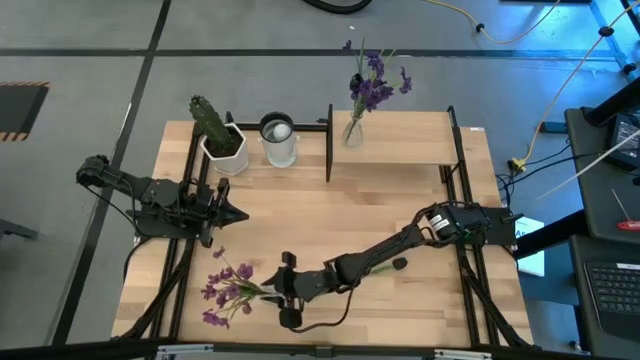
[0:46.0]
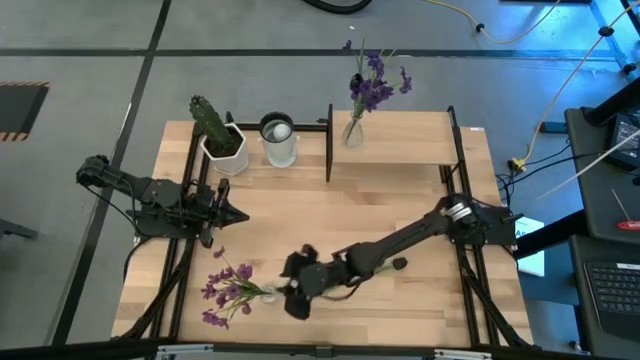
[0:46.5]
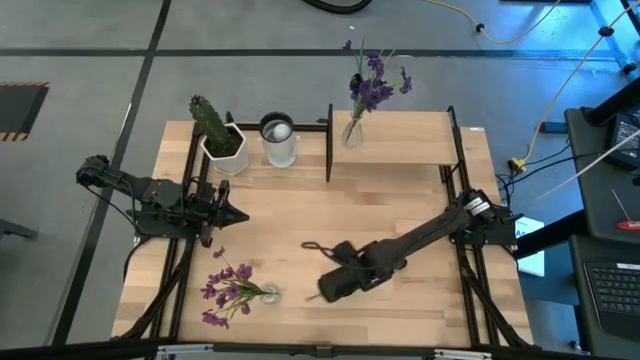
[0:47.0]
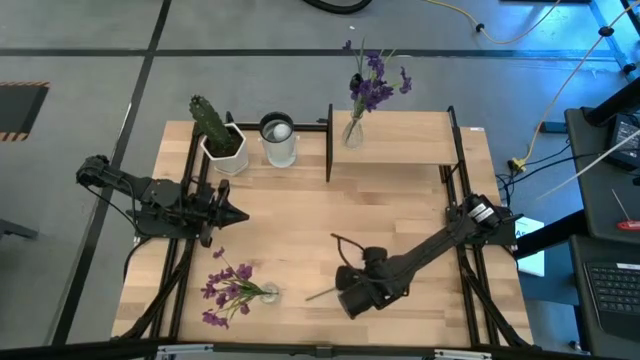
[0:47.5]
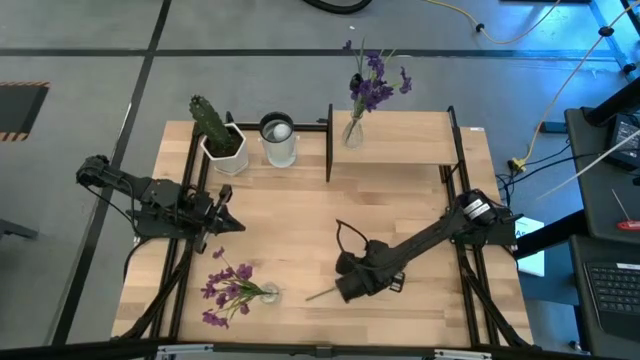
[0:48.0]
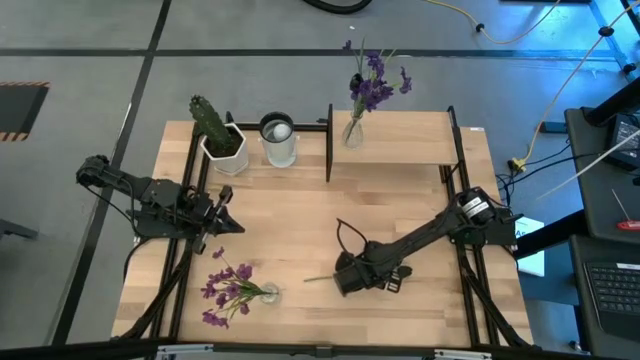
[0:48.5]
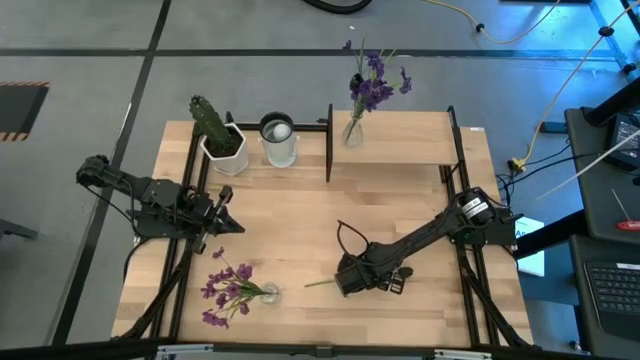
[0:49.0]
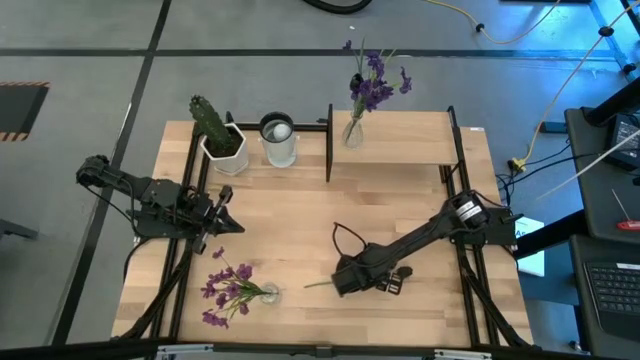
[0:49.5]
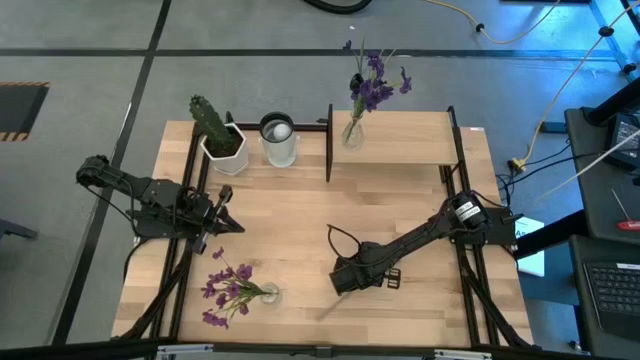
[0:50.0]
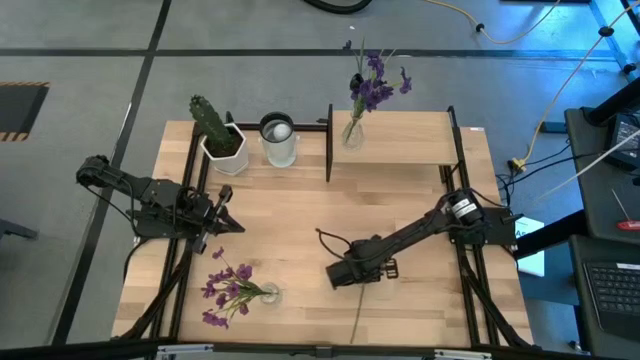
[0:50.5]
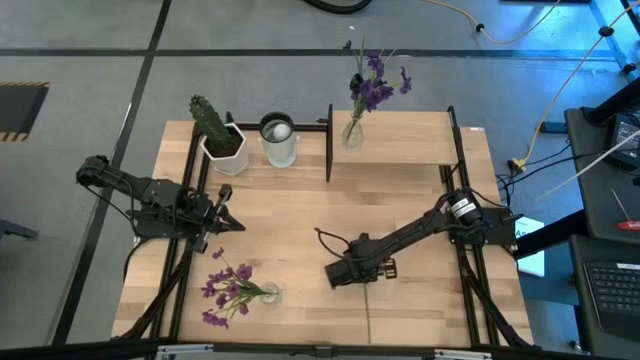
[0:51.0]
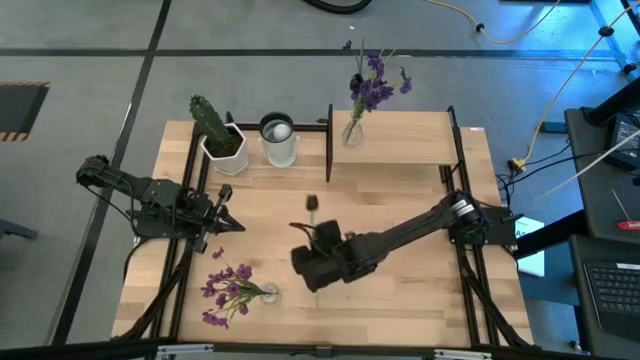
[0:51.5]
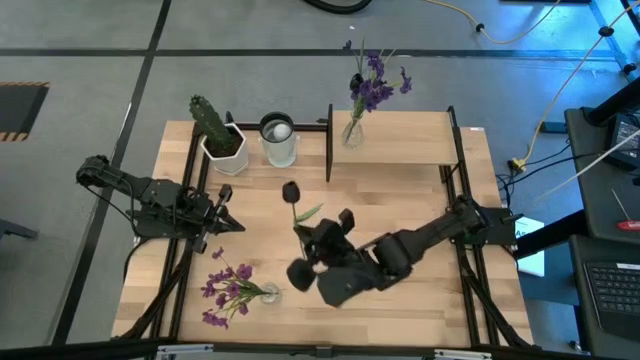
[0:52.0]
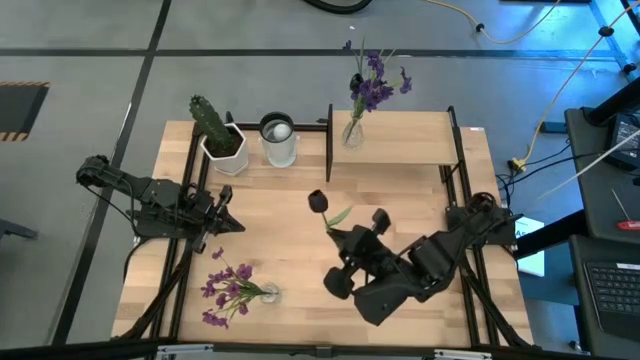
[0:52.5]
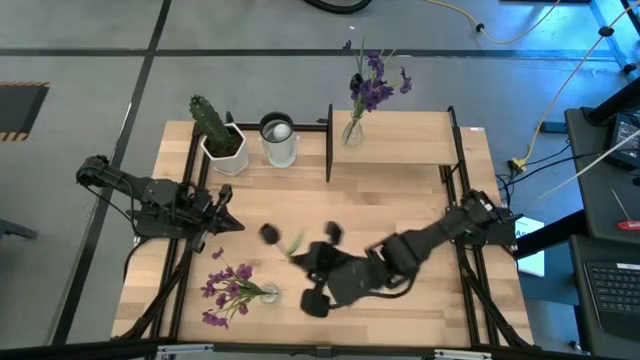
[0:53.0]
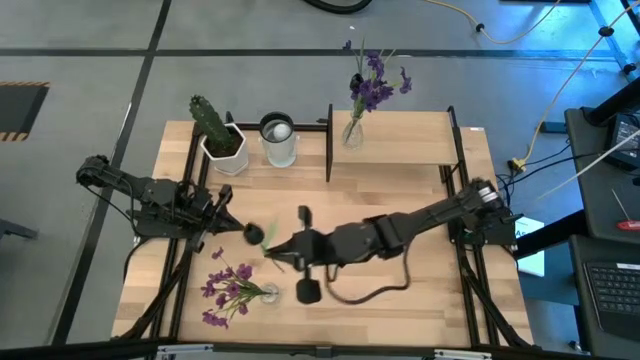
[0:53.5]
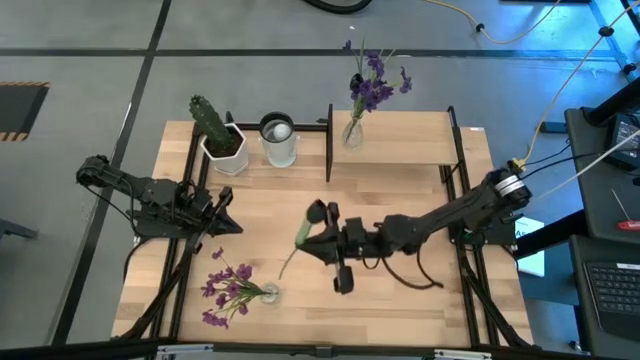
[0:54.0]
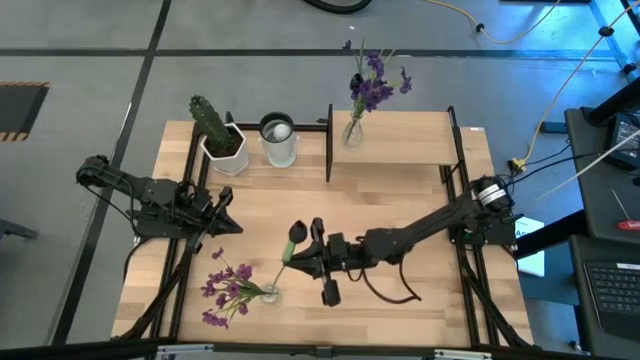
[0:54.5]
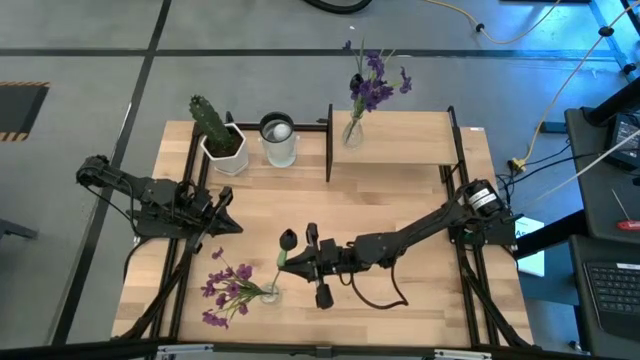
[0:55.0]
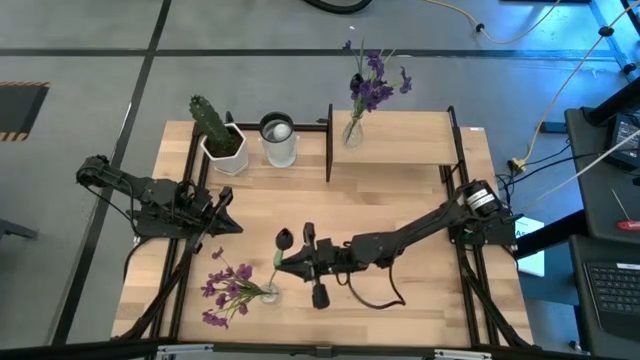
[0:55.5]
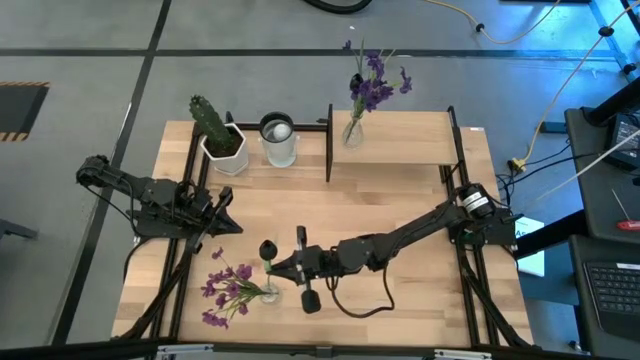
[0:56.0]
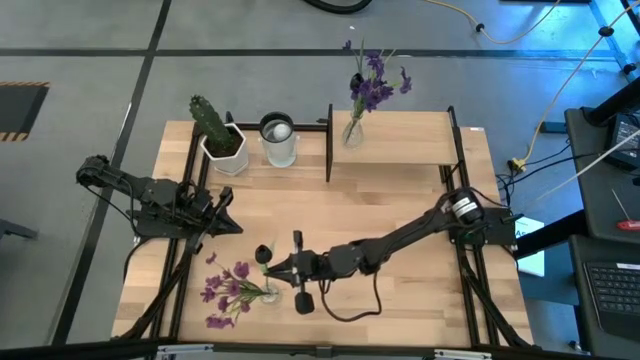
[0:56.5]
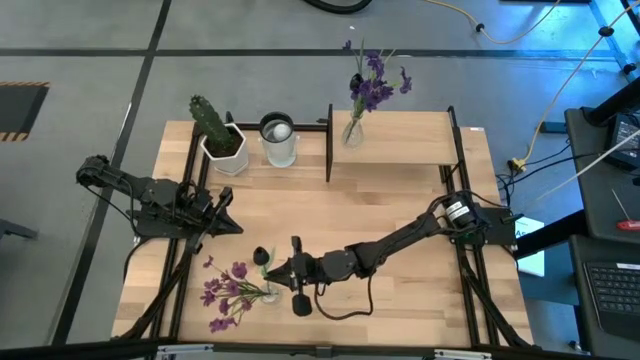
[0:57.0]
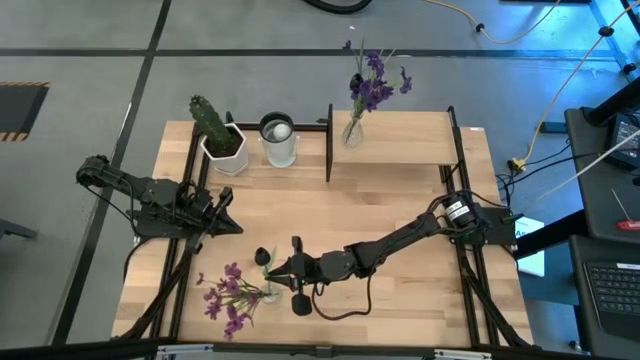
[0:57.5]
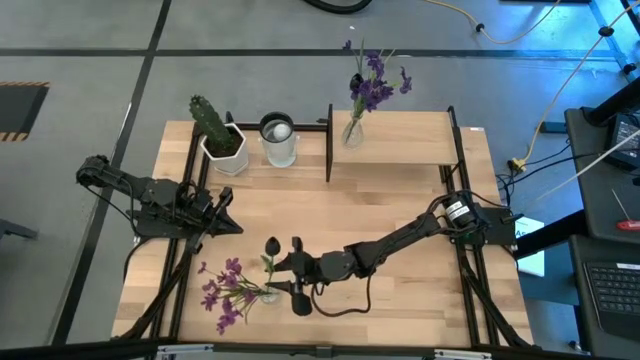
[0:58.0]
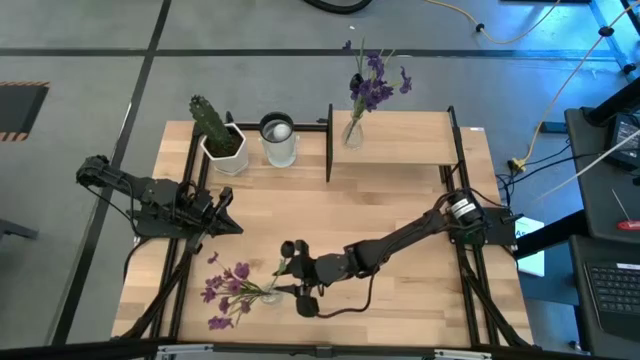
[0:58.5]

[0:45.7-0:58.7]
Task: Pick and place flowers into a vace then onto a shelf
Put the black flower into the transparent vase

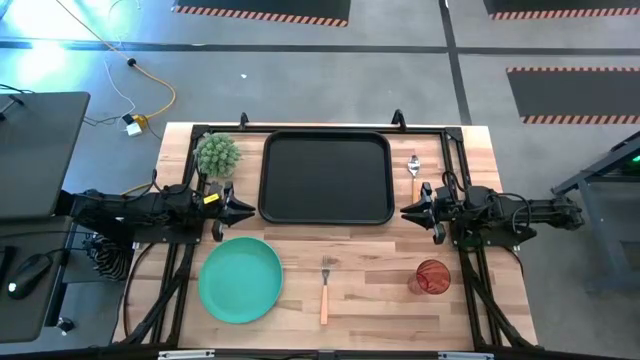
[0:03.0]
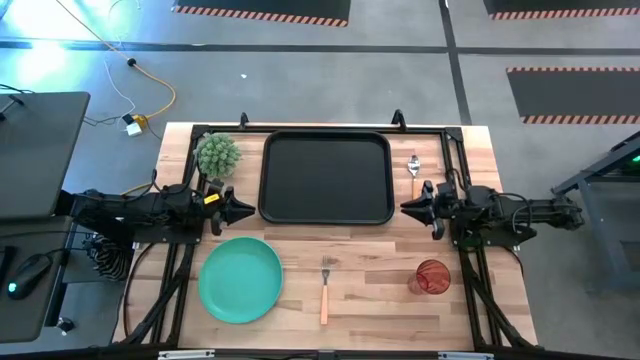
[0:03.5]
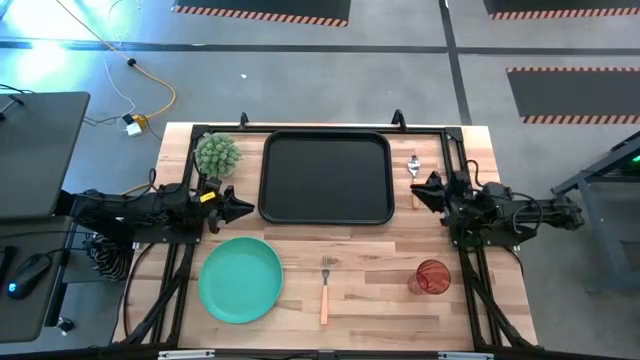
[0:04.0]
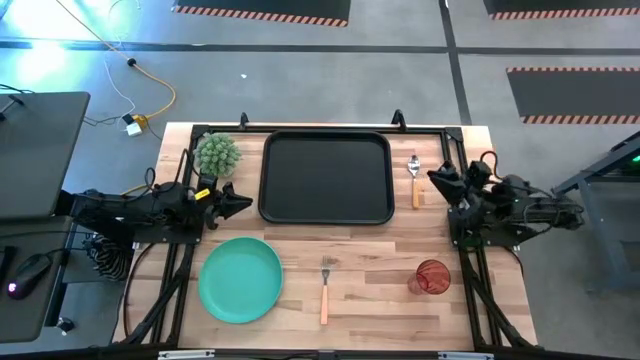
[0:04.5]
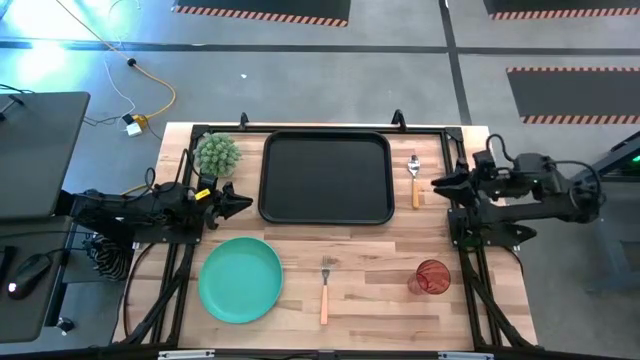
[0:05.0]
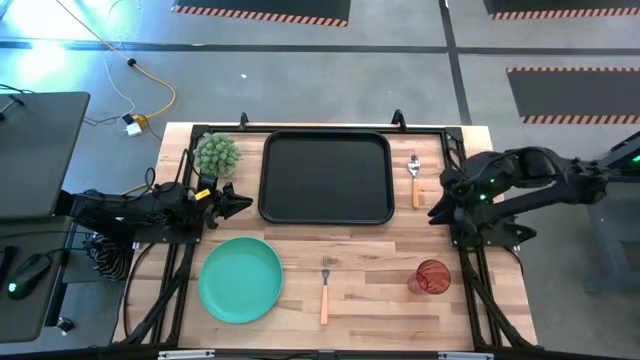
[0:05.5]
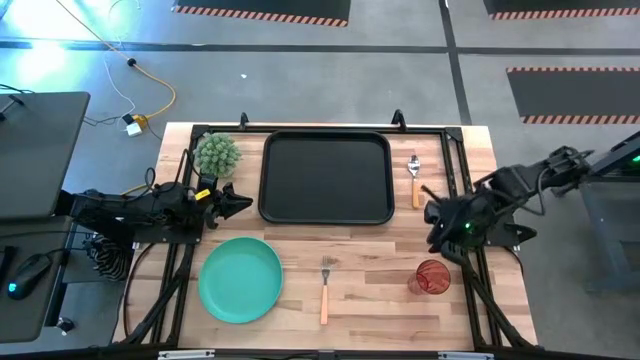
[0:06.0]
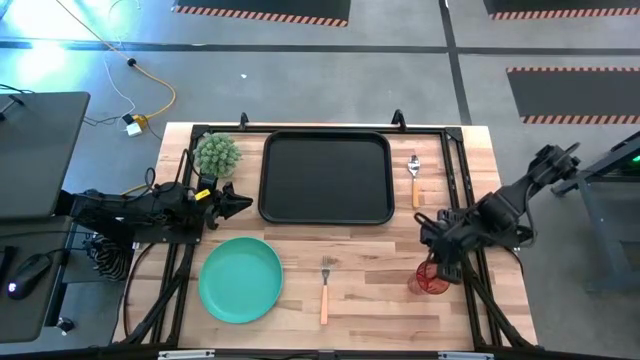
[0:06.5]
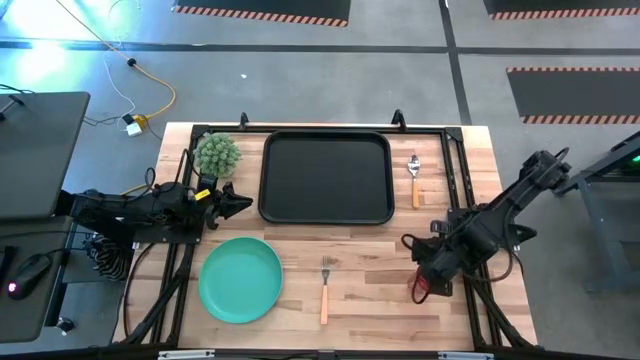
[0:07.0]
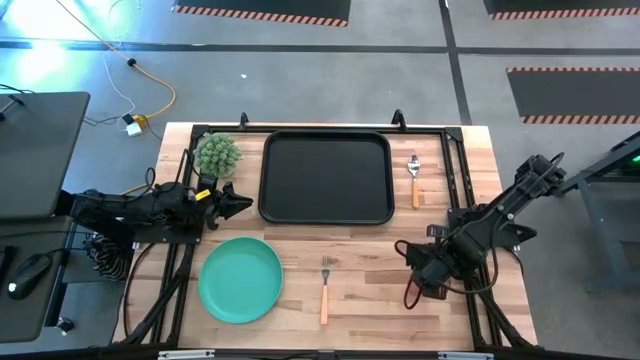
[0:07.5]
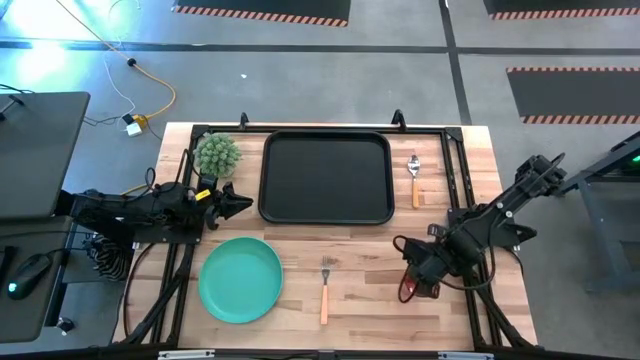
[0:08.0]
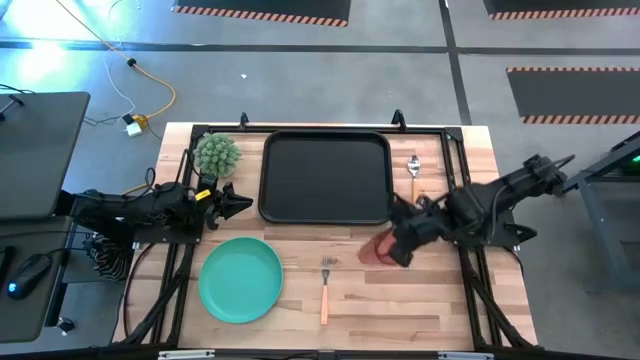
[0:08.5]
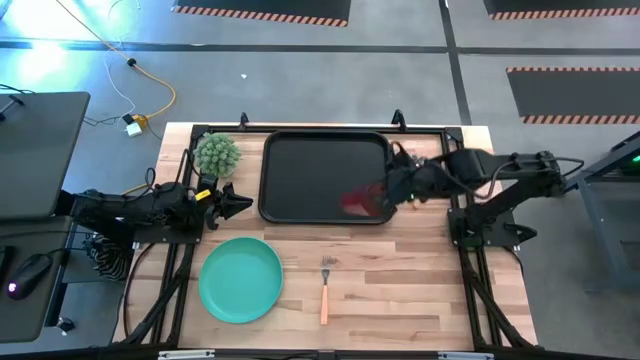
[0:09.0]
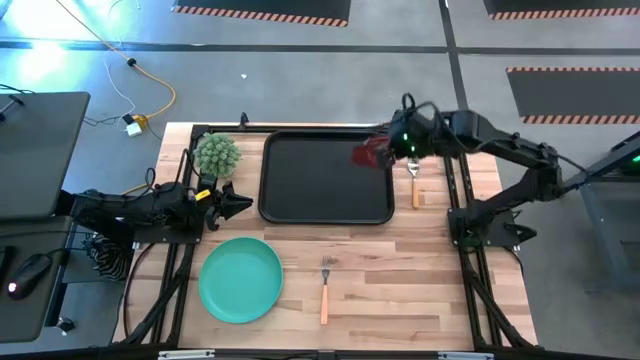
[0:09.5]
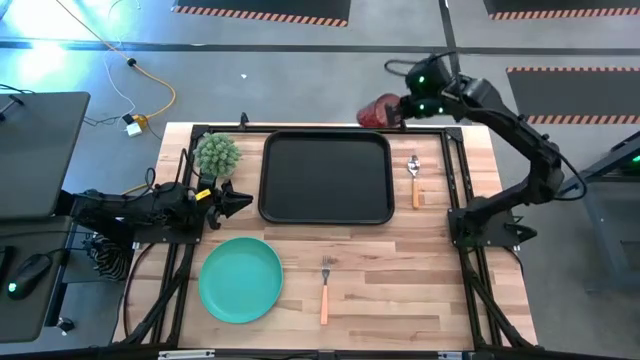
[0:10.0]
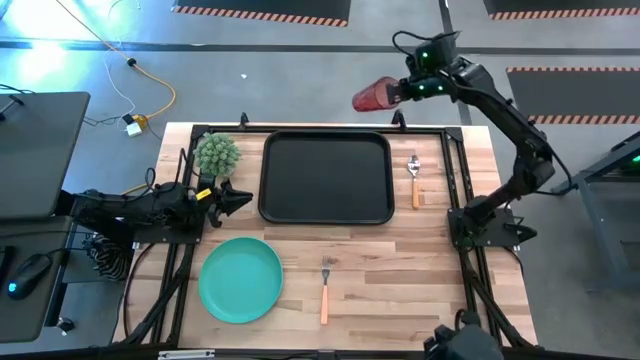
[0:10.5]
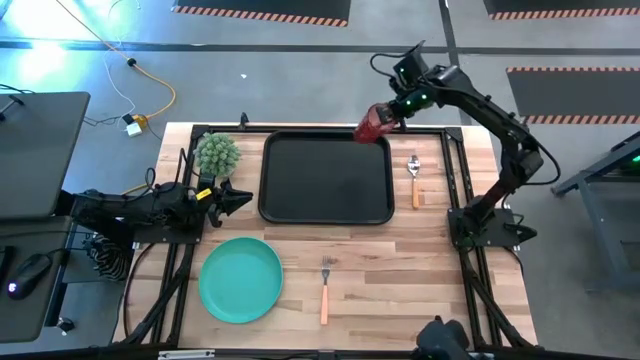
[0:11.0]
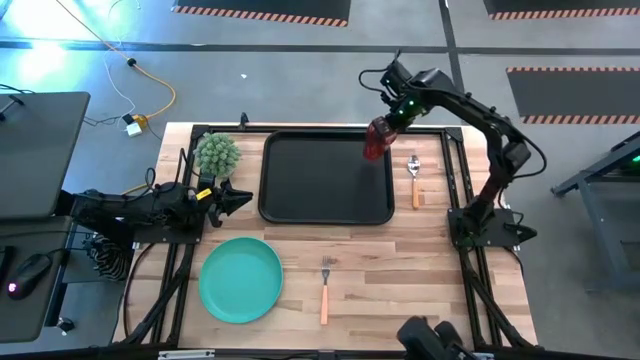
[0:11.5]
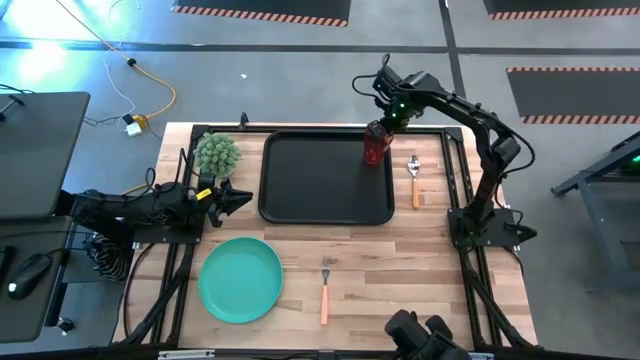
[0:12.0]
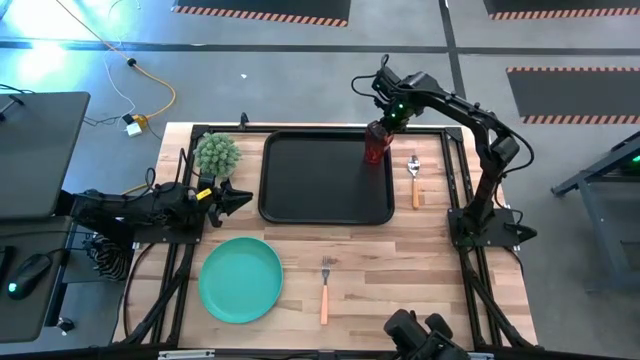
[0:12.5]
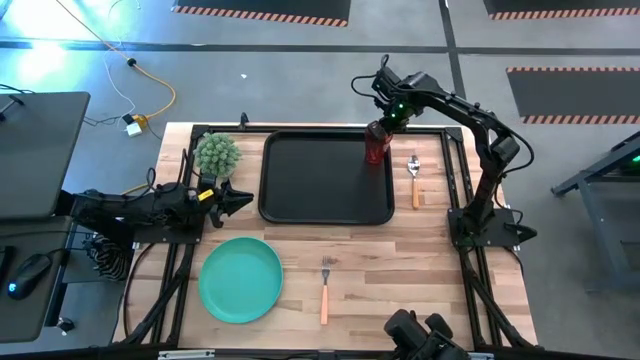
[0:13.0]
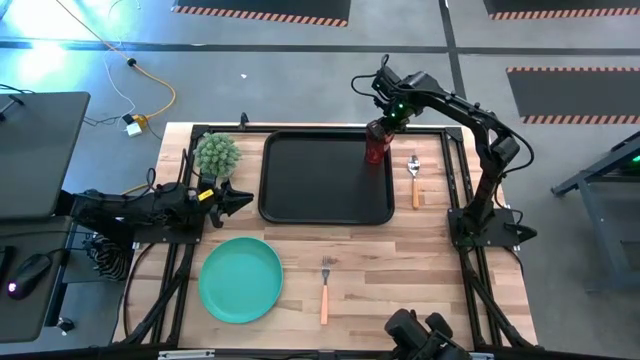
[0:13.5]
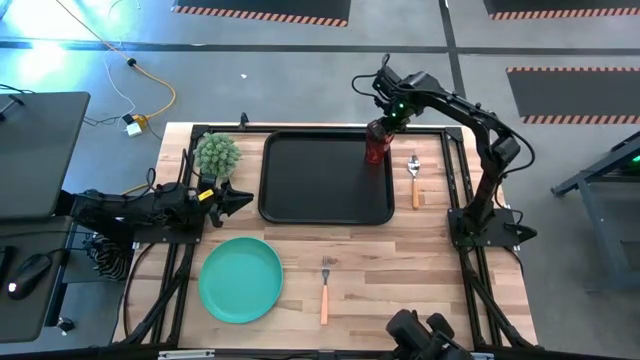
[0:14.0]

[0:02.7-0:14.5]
Task: Pick and place plate/cup/fork/spoon on tray
Put the red cup on the black tray
